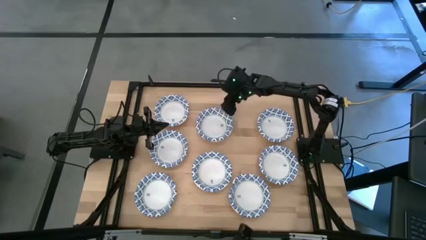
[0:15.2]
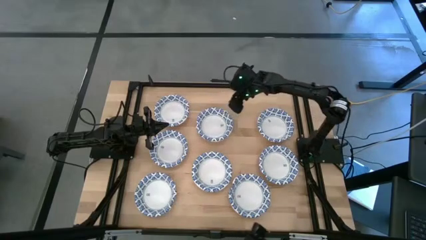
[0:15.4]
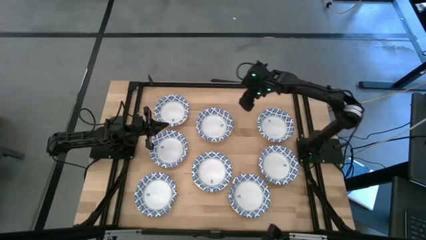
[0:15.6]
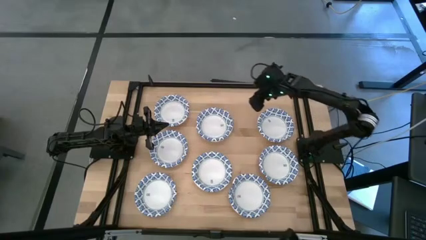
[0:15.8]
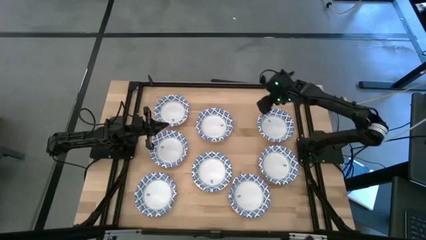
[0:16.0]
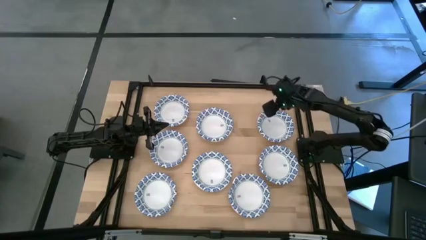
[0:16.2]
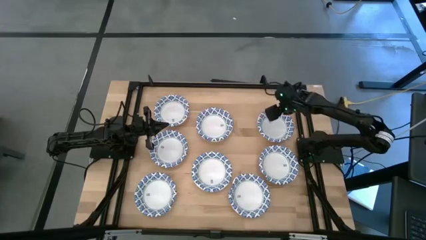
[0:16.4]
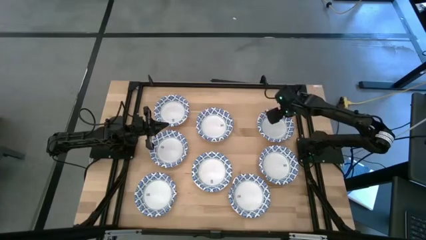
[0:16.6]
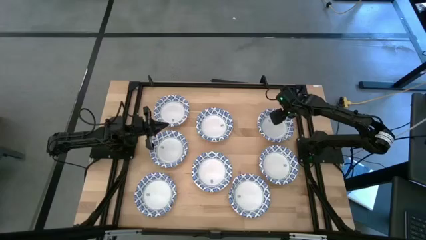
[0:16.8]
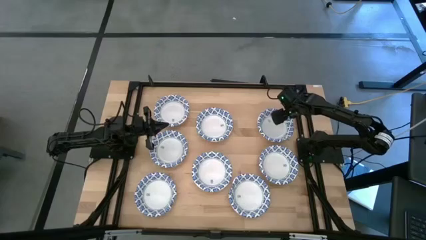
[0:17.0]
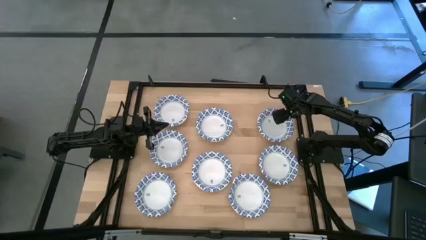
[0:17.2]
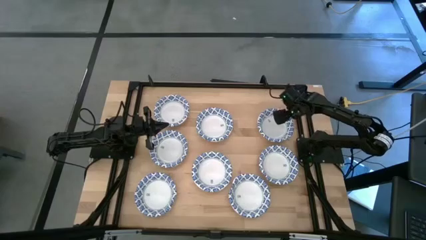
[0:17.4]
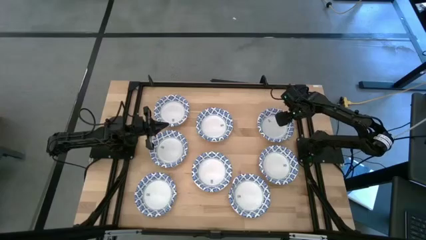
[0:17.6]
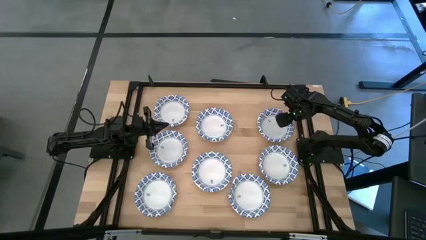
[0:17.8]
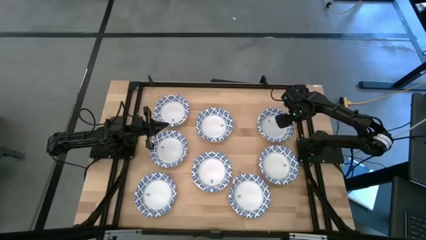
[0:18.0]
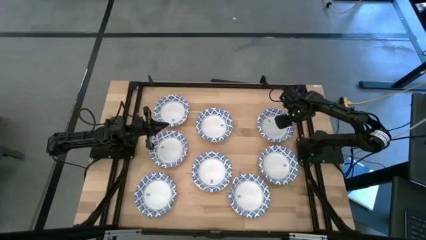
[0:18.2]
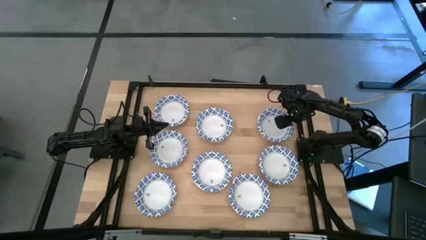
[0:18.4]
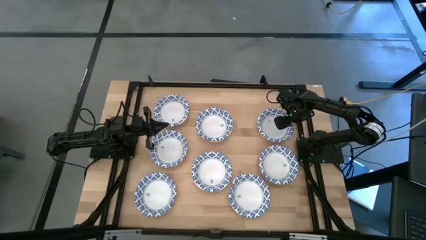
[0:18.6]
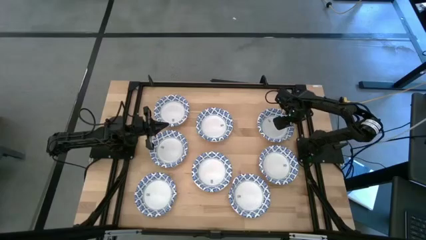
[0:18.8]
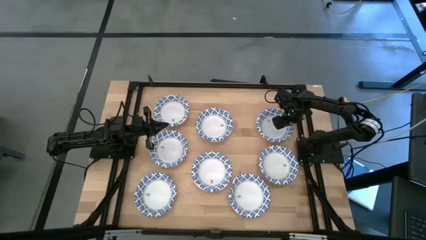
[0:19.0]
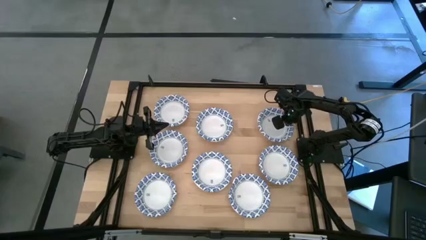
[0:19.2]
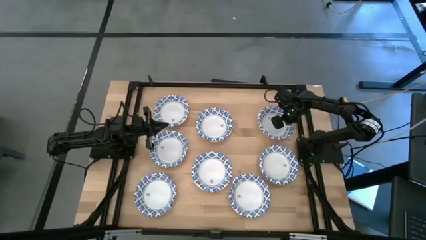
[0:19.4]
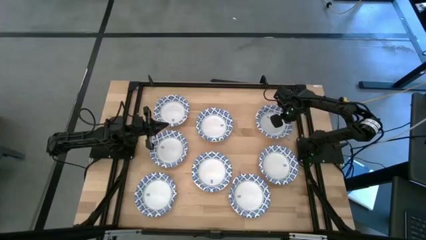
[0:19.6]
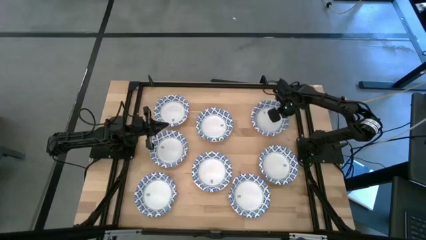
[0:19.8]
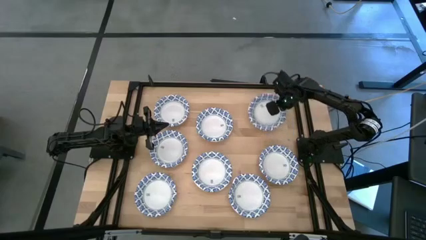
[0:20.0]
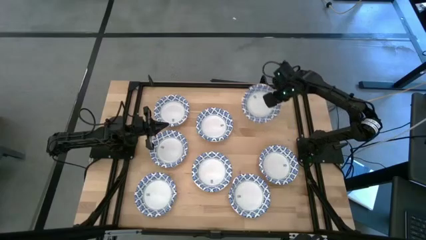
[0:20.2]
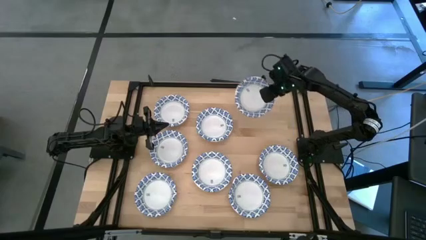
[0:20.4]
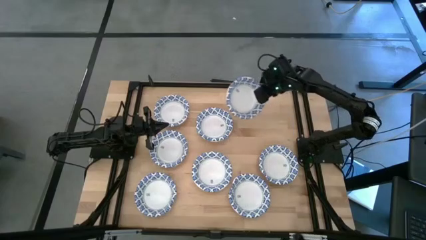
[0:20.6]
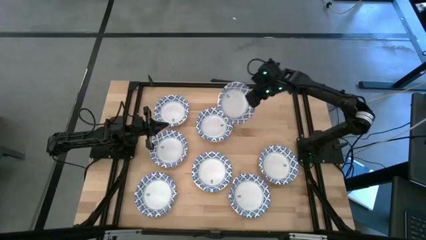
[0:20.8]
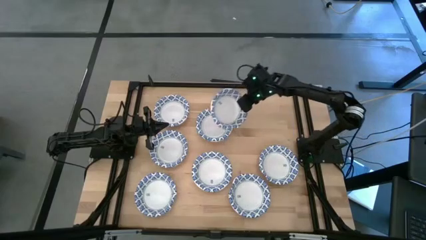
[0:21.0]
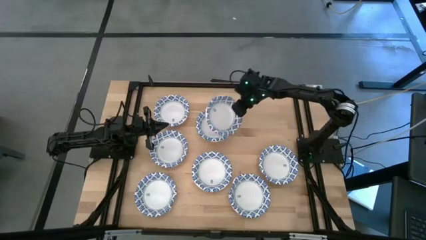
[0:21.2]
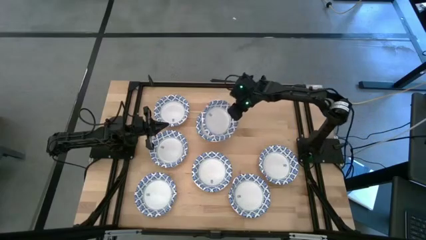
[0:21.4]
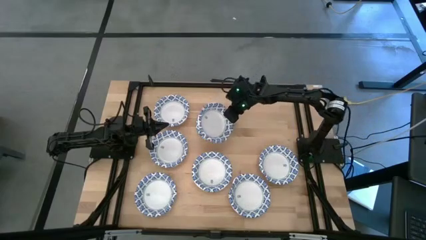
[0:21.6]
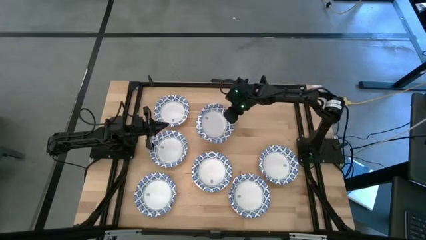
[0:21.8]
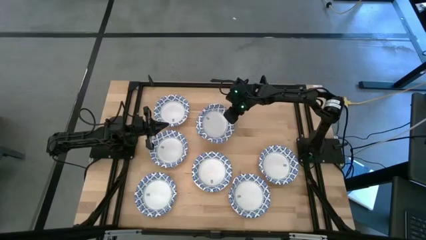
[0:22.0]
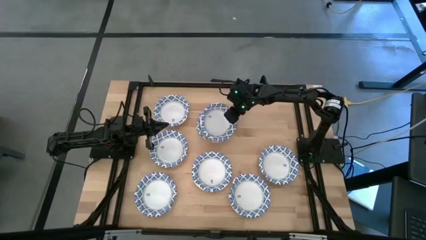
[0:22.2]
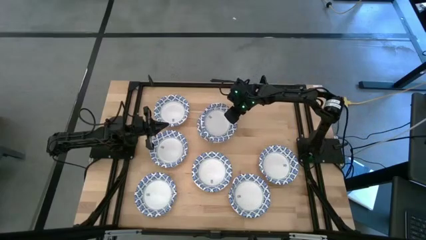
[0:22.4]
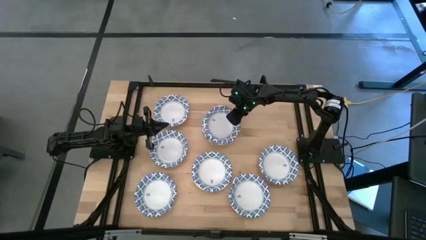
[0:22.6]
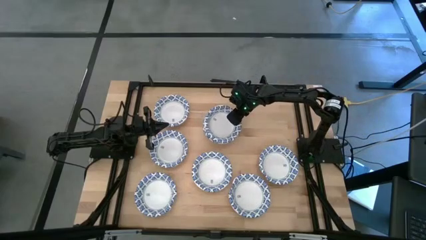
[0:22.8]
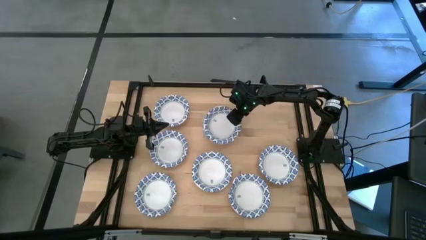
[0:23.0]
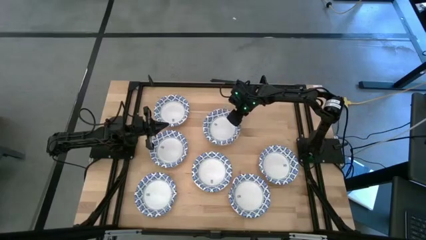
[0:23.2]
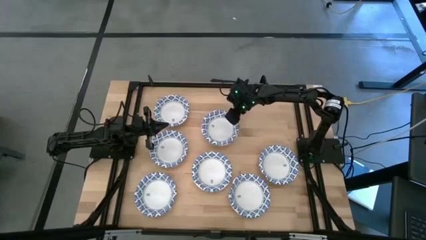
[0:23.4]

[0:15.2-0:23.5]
Task: Nest bowls inside each other
Stack the bowl on top of the bowl on the table

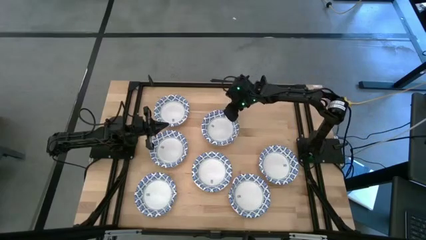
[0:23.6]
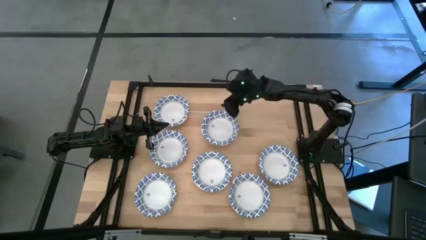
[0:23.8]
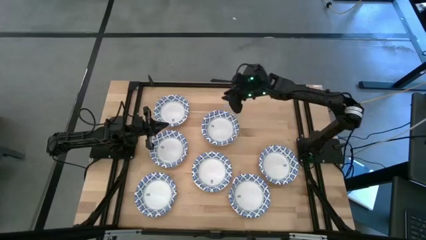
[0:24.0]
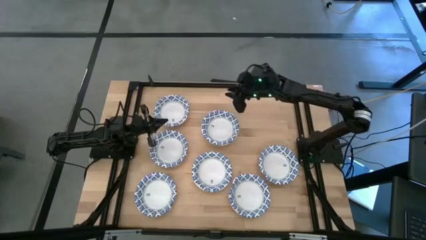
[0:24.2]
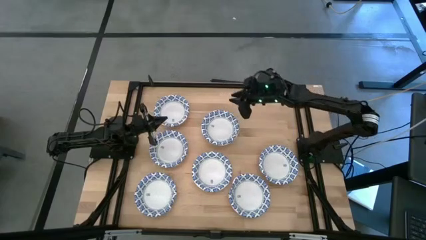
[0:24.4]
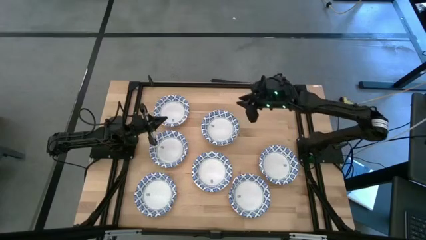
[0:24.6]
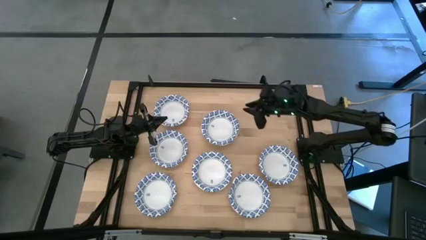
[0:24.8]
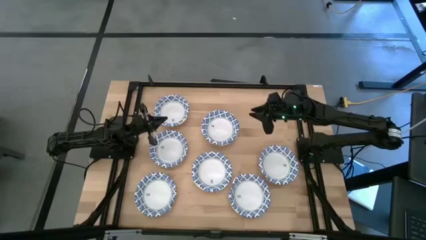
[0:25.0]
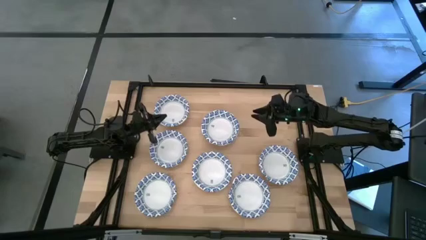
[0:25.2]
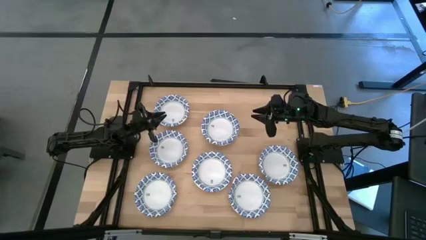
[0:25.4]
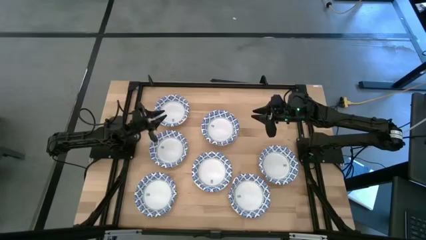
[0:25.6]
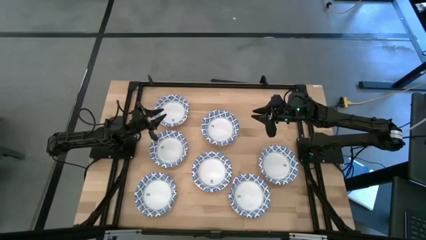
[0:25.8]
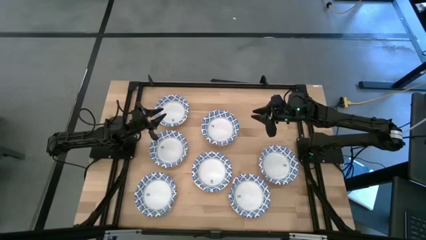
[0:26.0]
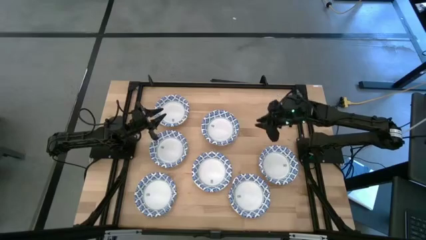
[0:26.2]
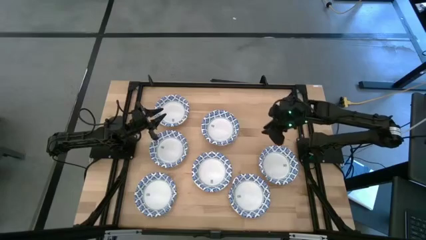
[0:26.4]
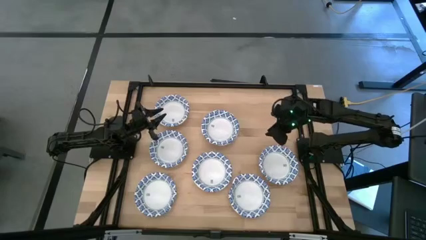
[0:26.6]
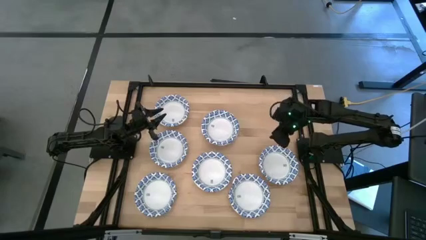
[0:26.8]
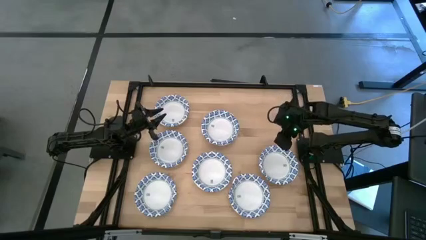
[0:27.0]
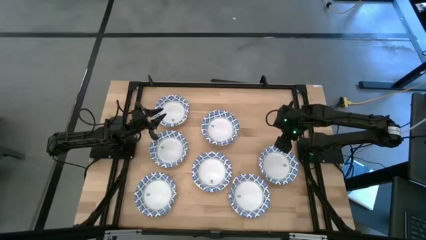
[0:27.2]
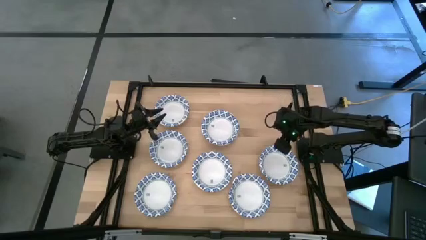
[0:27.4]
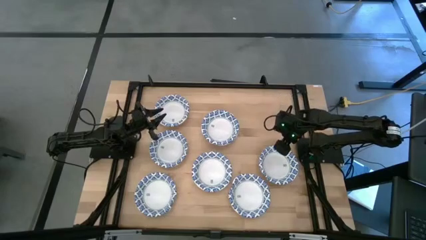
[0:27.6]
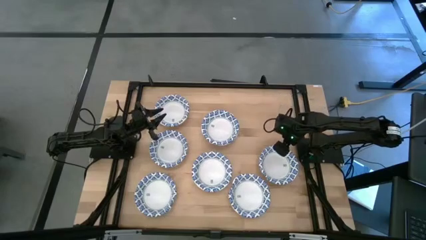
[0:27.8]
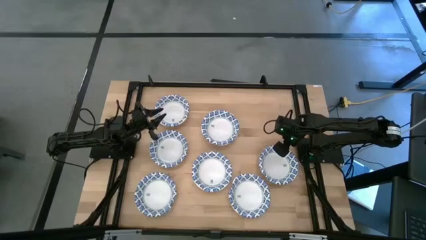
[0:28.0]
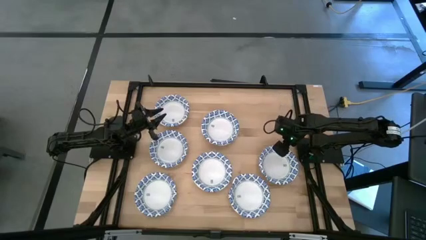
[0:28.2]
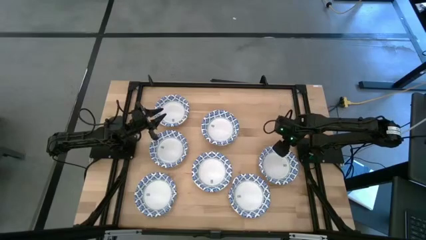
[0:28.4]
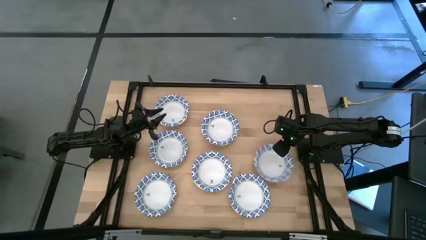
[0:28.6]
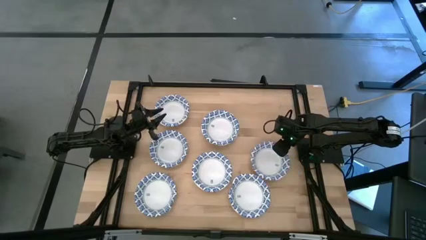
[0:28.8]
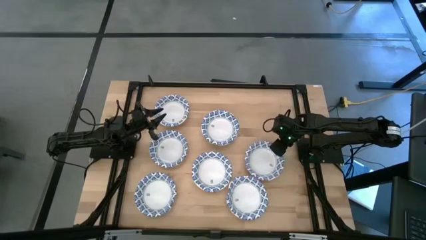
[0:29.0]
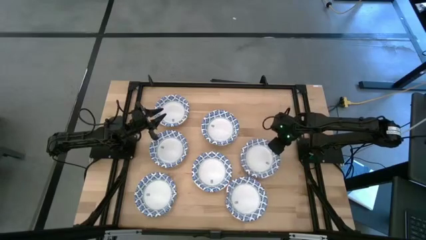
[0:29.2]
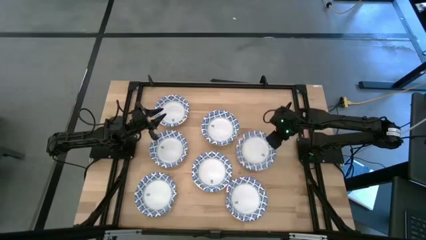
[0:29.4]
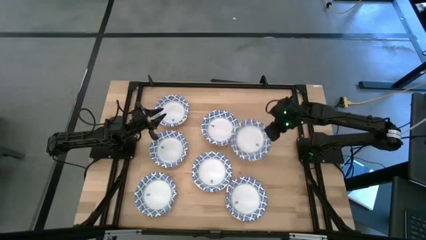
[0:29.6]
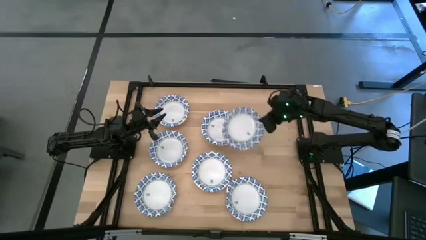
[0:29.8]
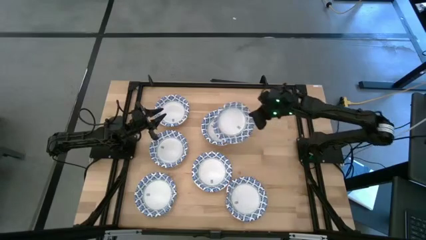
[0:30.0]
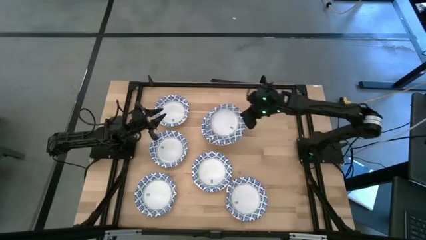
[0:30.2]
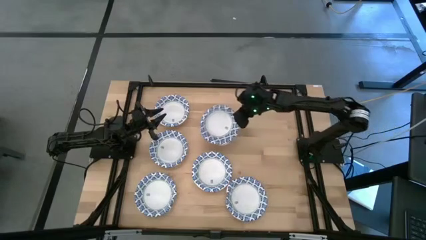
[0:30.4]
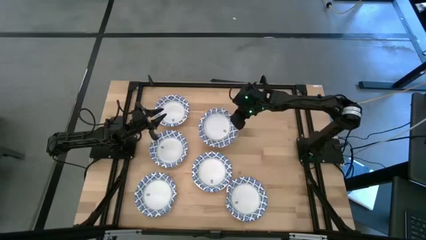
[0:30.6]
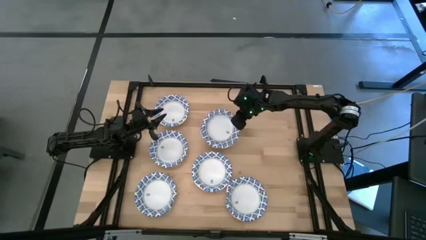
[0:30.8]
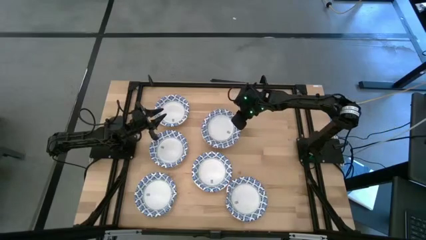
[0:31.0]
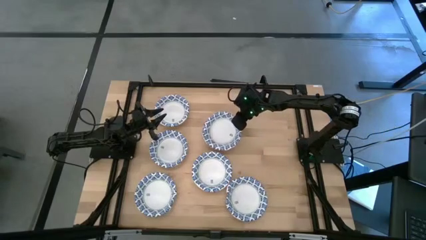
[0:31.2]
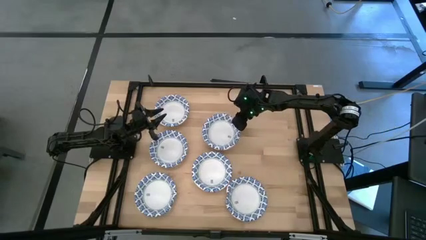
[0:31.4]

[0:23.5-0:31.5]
Stack the bowl on top of the bowl on the table
